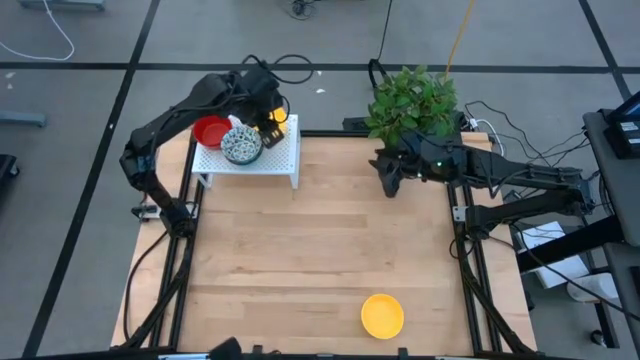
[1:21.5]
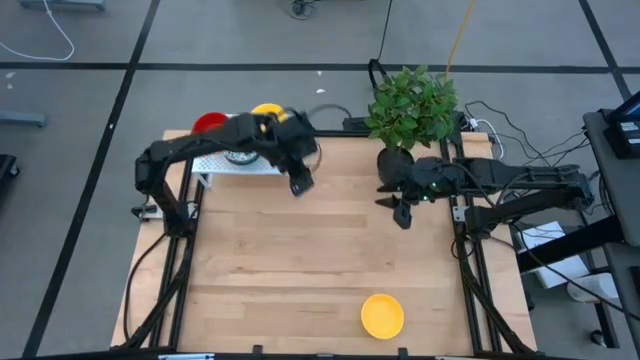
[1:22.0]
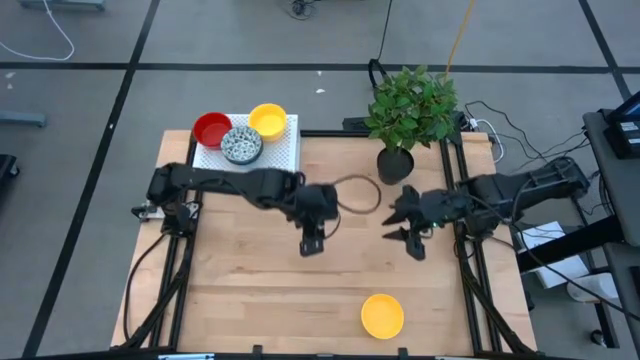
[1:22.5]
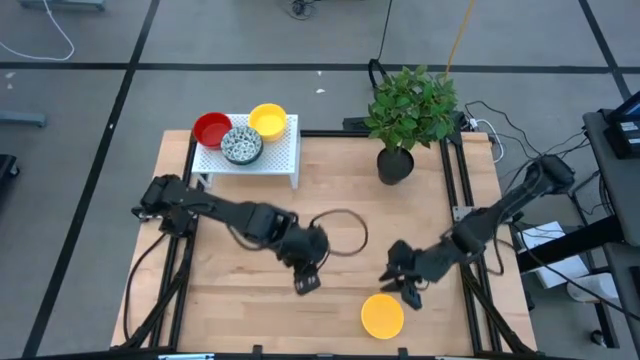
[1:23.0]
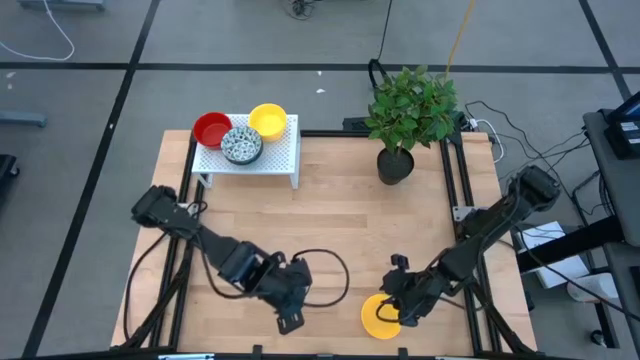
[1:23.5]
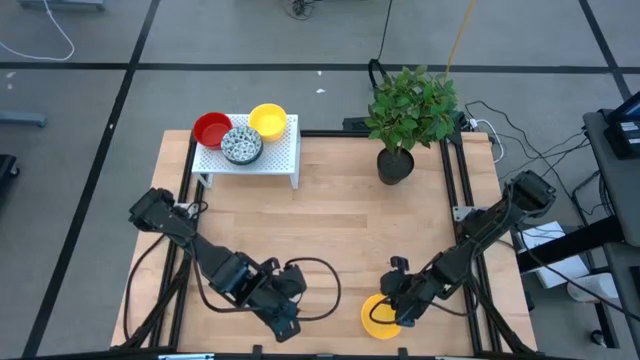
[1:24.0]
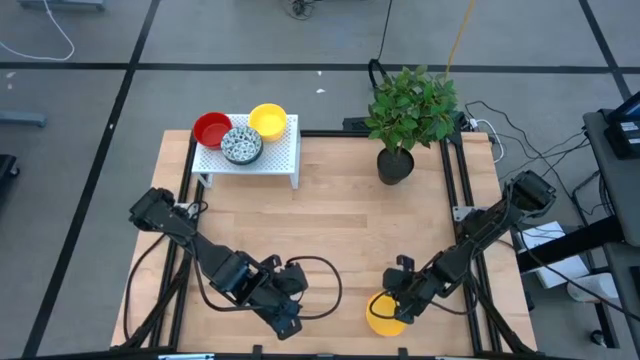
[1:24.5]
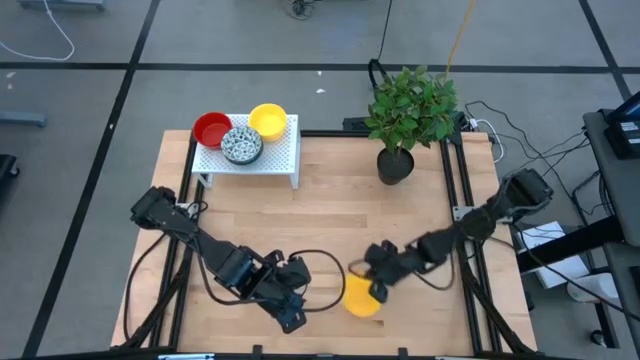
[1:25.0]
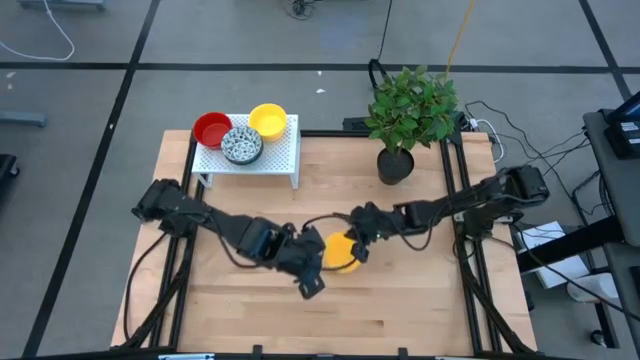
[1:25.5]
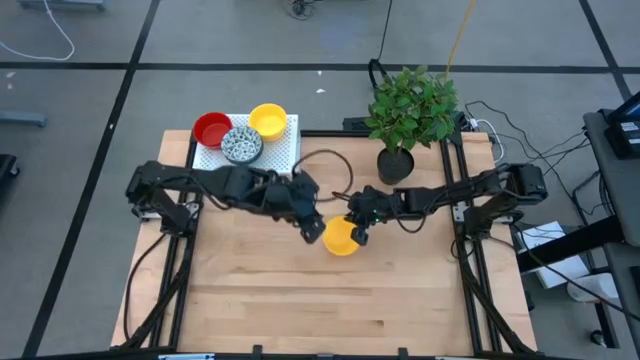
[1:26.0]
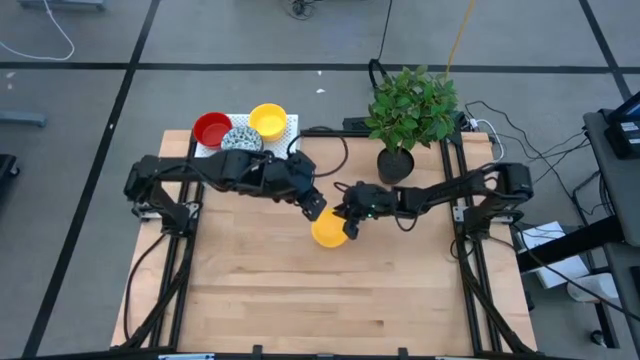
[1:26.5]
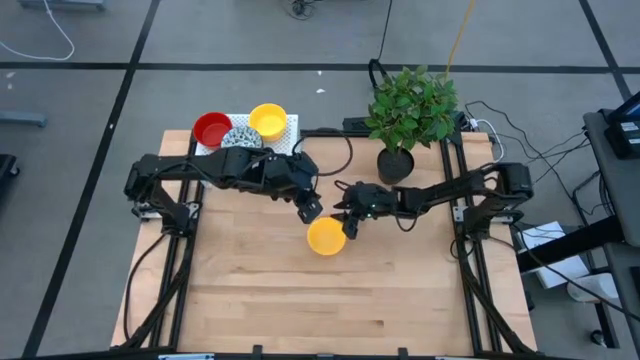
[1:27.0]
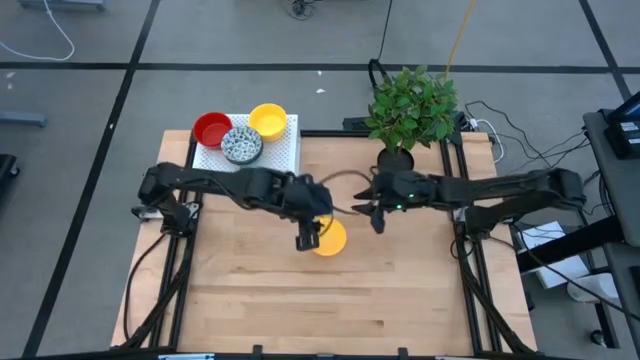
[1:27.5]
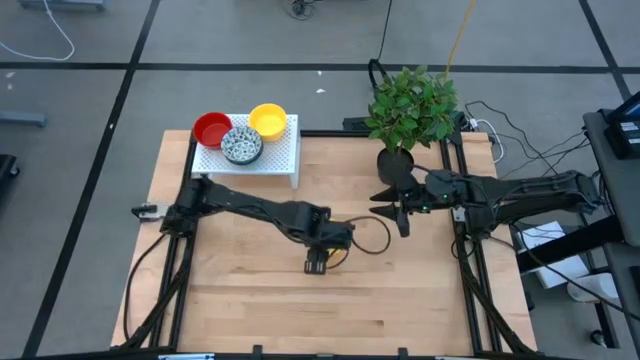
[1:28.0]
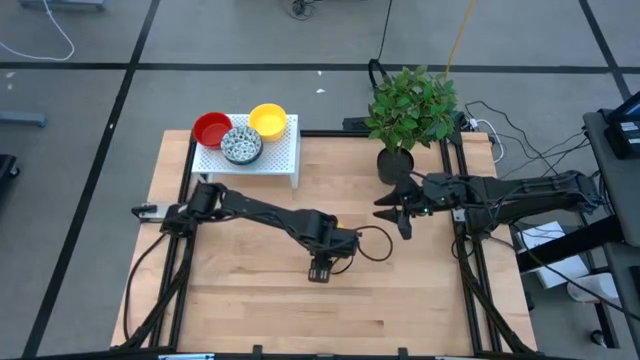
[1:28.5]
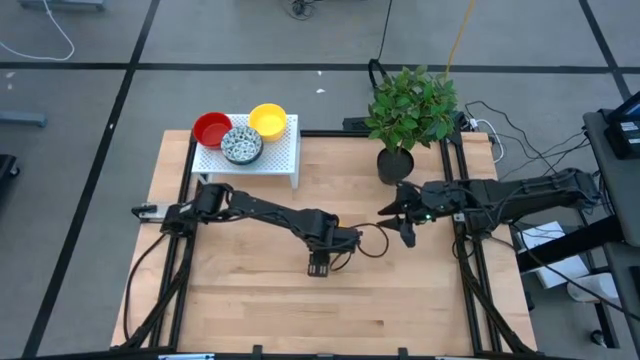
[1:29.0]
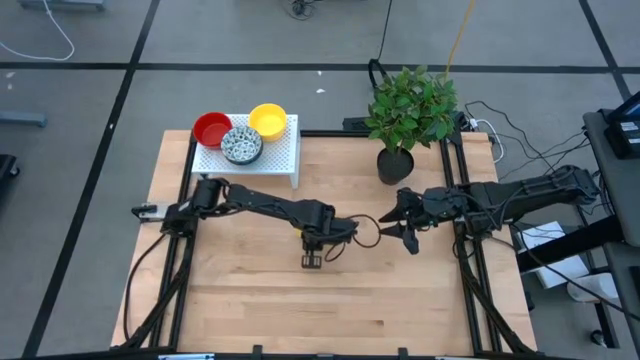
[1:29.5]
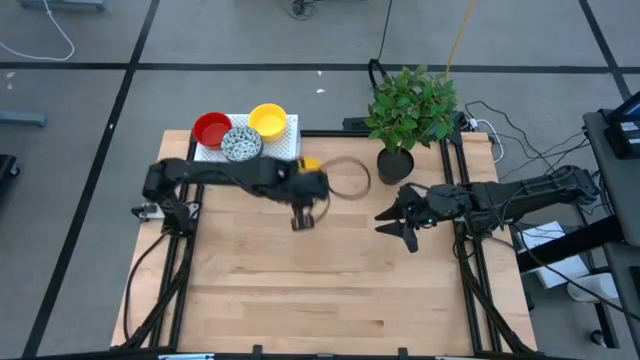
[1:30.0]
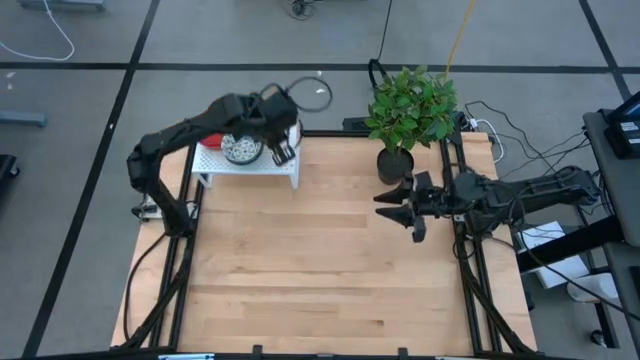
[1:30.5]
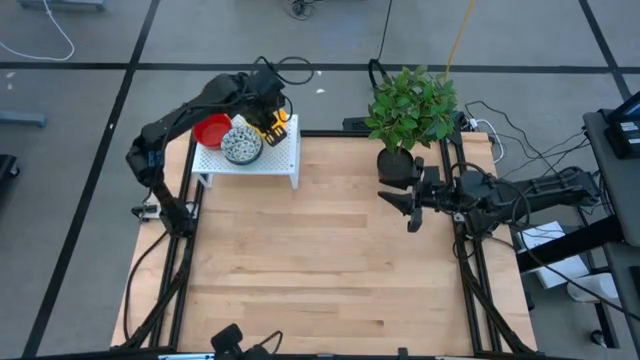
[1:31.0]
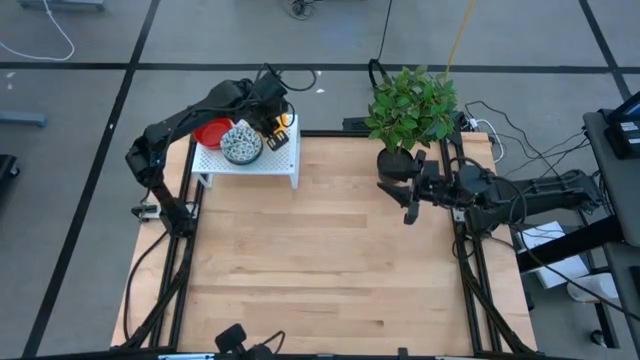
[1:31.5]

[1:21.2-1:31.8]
Task: Pick & Place Mini bowls
Stack the yellow bowl on the yellow bowls on the shelf

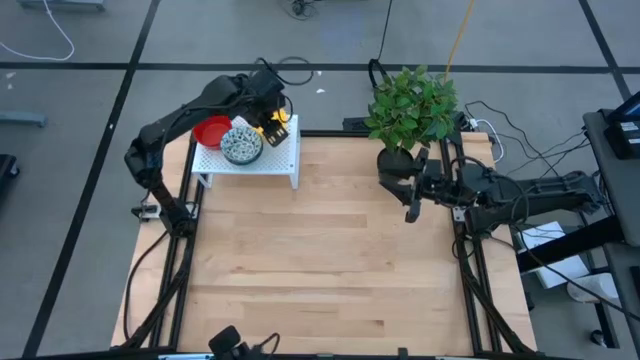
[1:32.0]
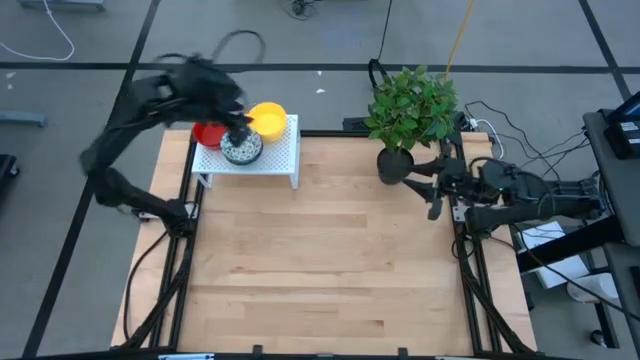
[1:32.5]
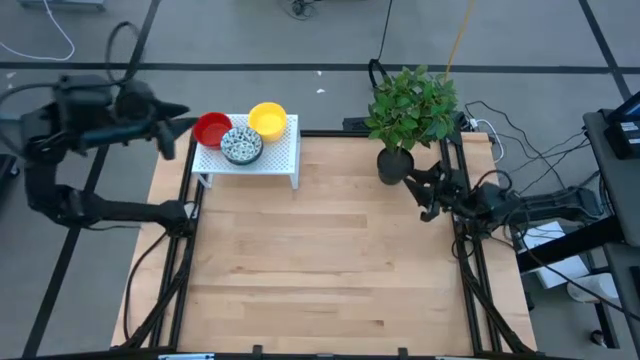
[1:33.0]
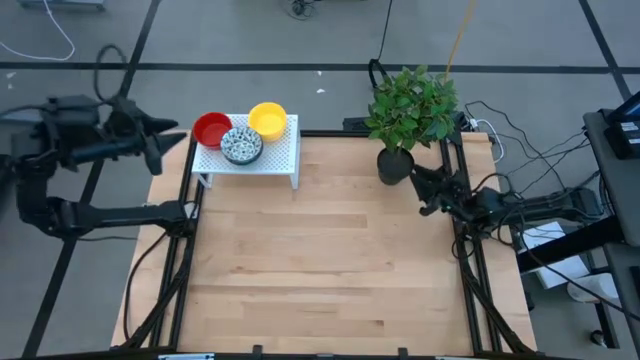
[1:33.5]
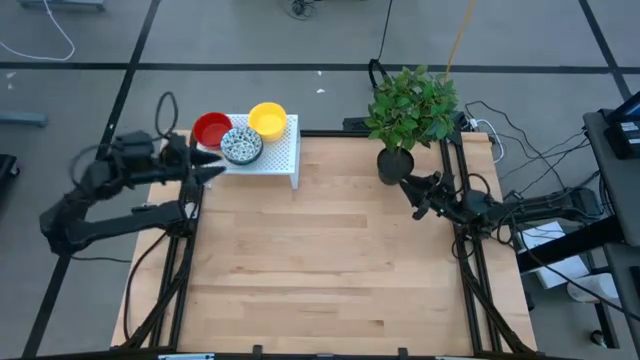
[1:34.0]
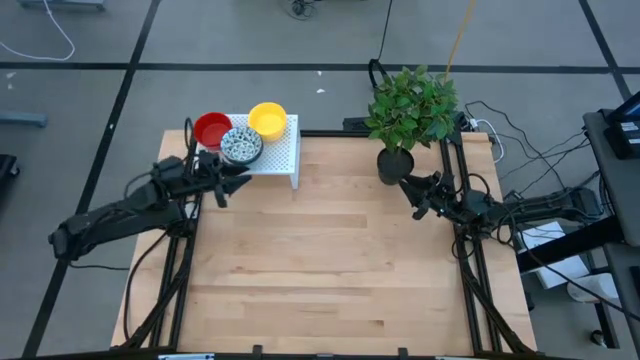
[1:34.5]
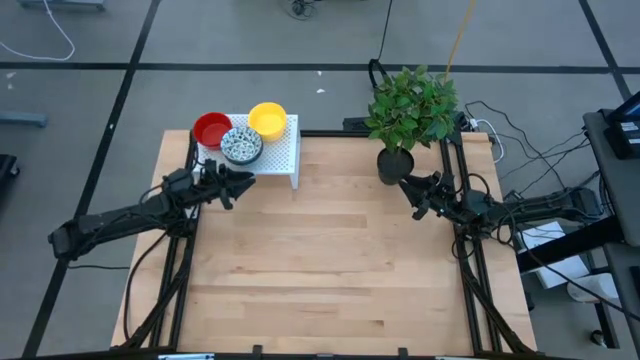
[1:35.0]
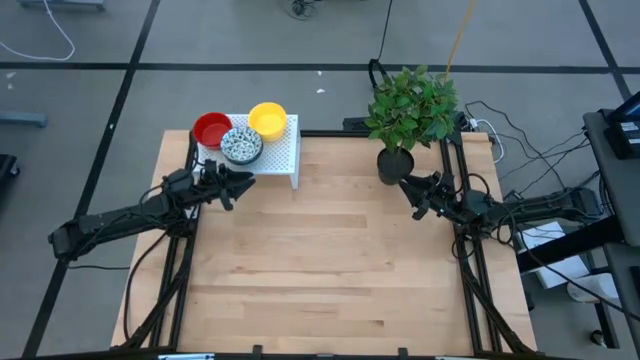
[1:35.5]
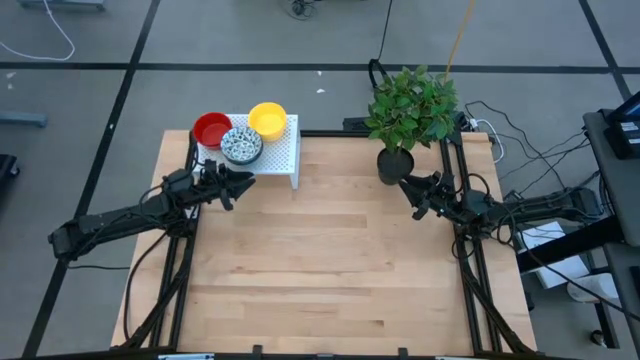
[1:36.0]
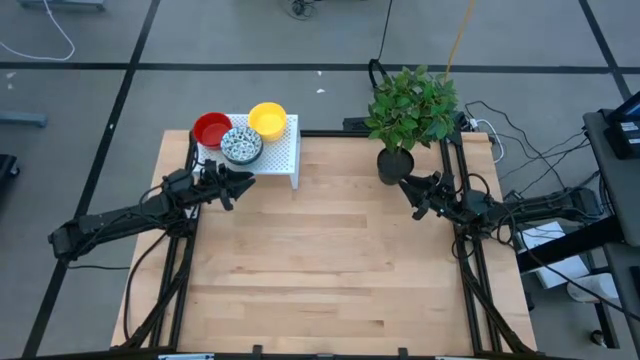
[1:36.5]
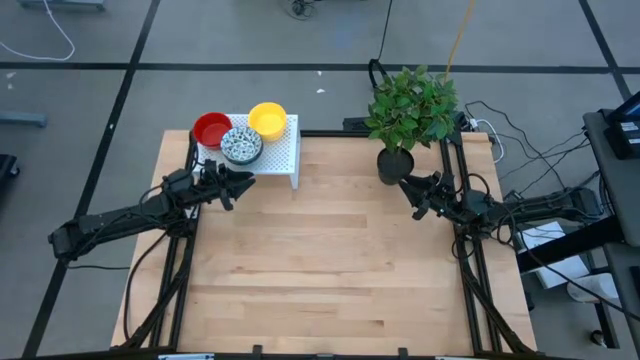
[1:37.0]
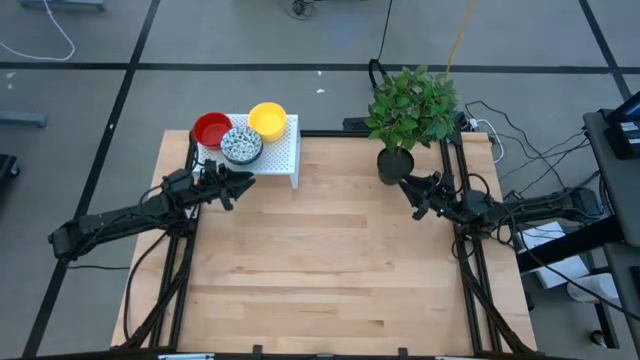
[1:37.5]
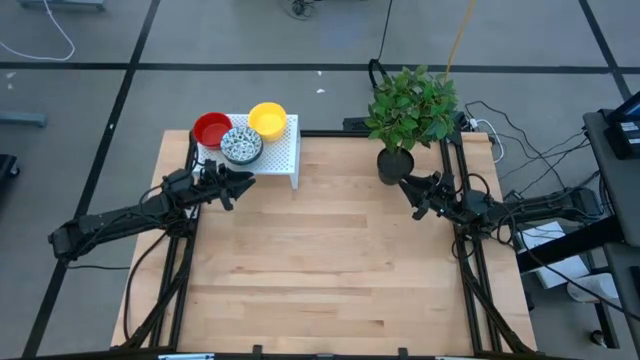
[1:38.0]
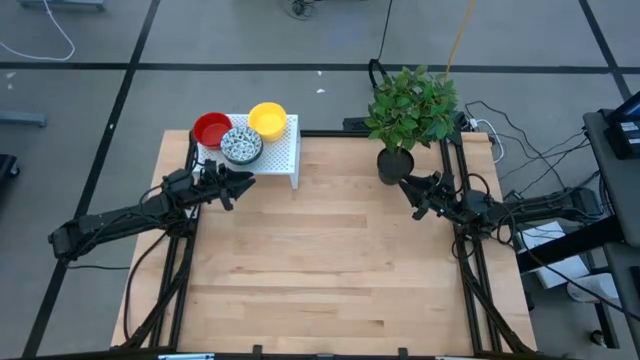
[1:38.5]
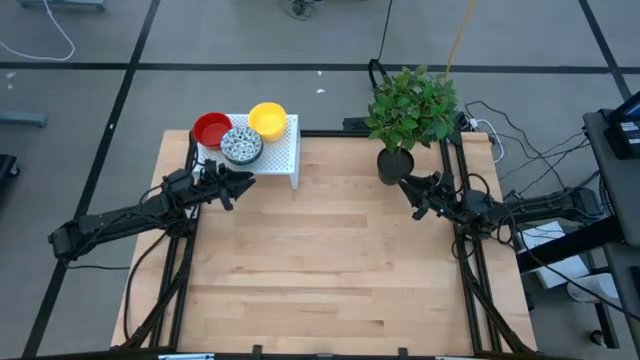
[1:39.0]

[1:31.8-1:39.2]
Return to Home Position

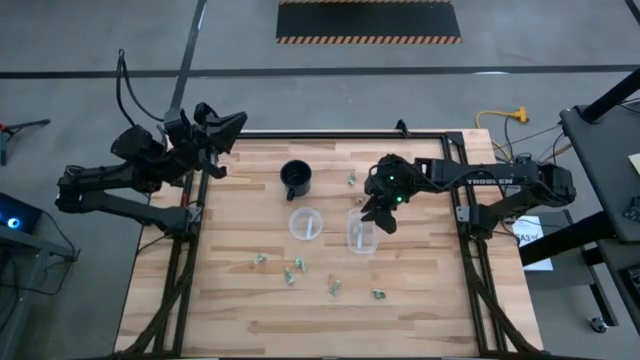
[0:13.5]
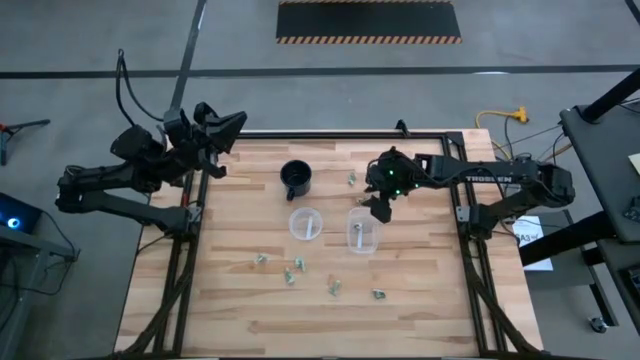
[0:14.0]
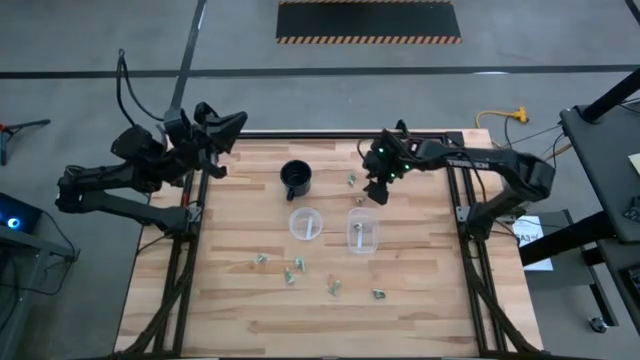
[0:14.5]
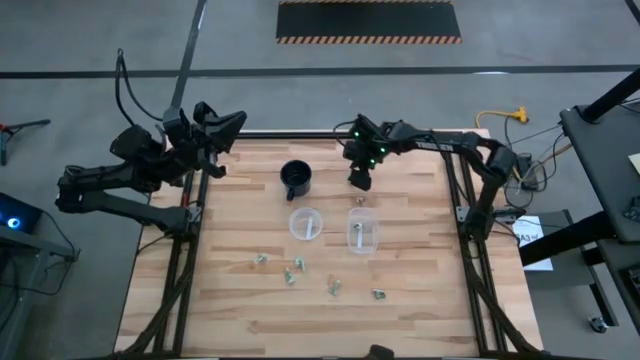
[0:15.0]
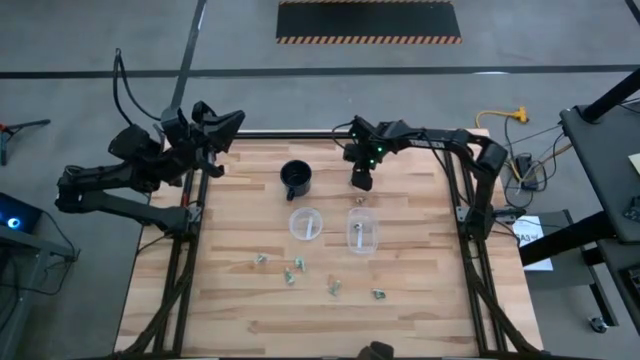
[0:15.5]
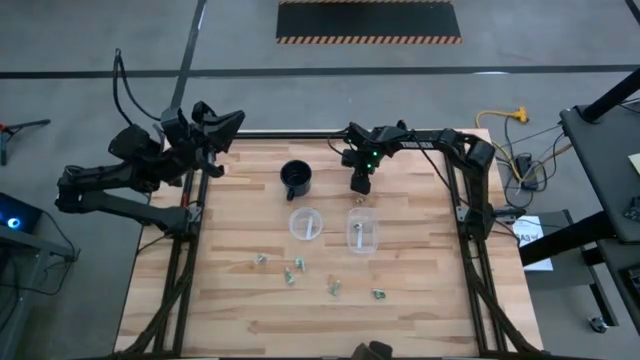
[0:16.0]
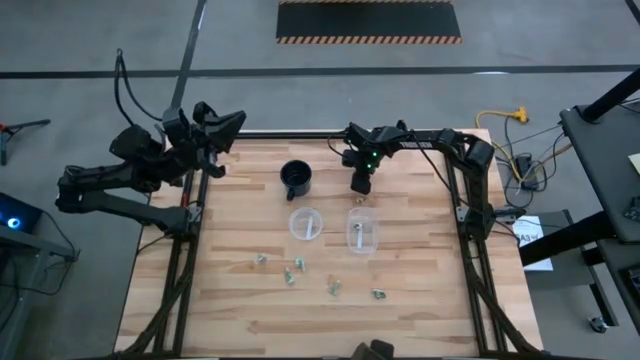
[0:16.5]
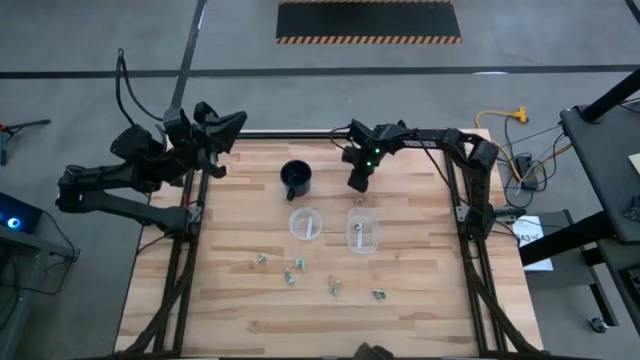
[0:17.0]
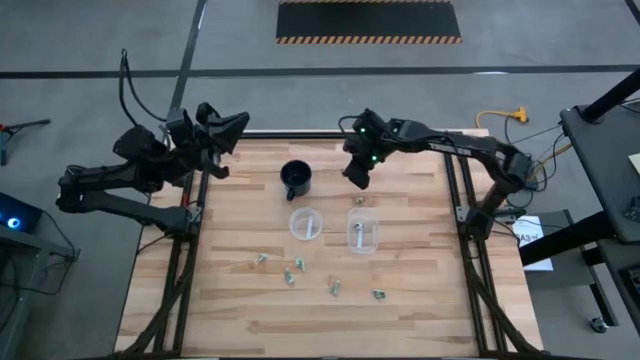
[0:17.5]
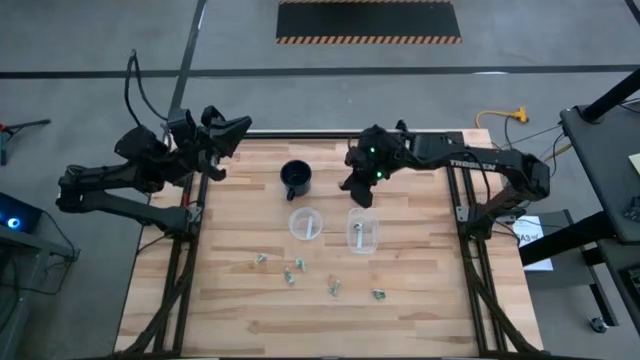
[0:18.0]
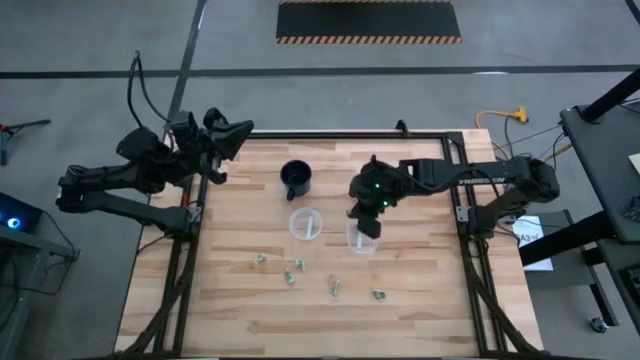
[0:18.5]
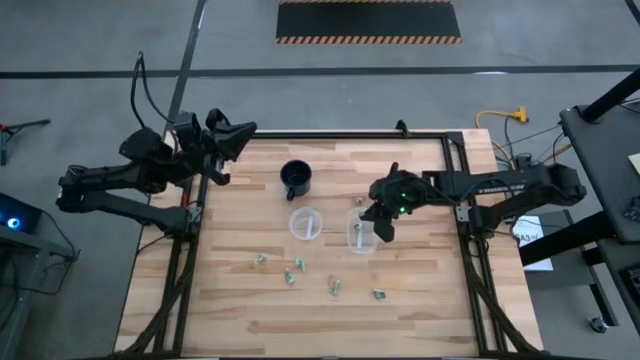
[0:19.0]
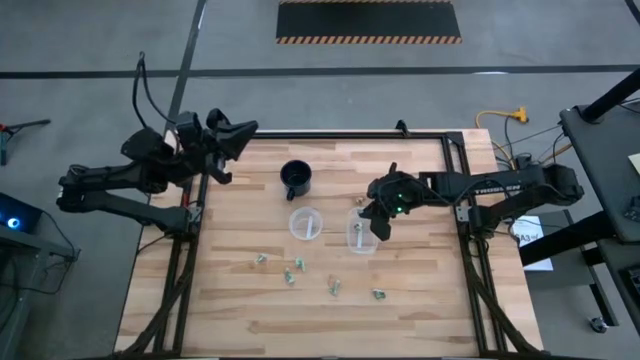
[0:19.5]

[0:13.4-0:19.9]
Task: Pick and place Stevia / Truvia into bins
Put the truvia packet into the oval transparent container
